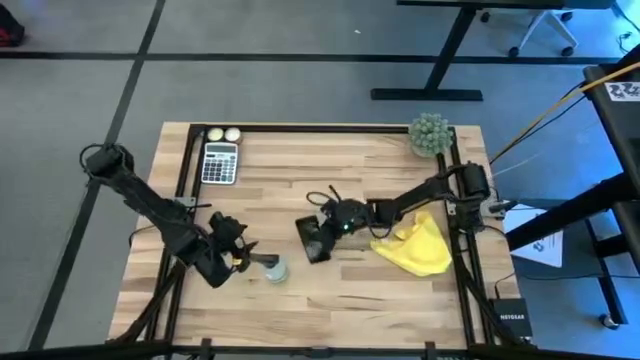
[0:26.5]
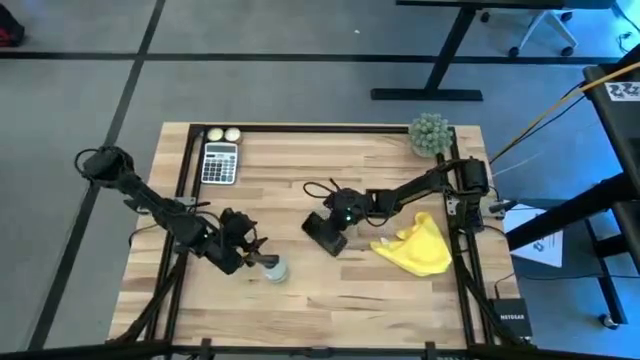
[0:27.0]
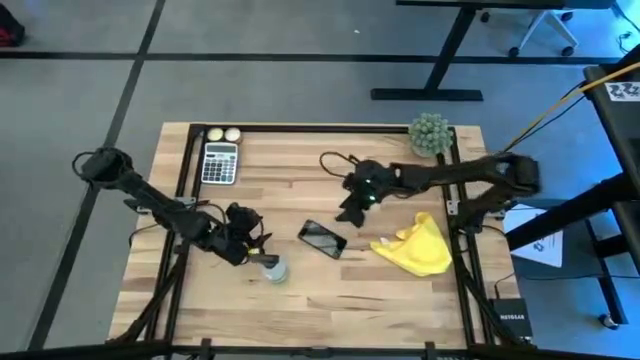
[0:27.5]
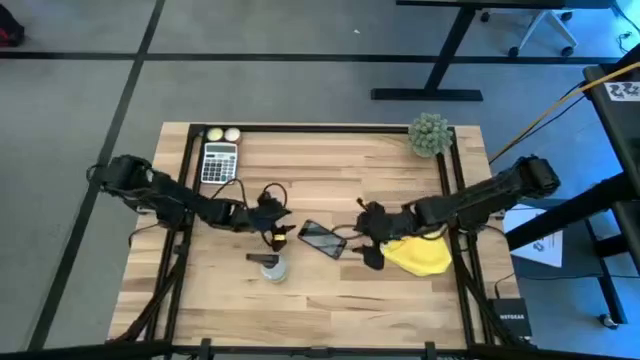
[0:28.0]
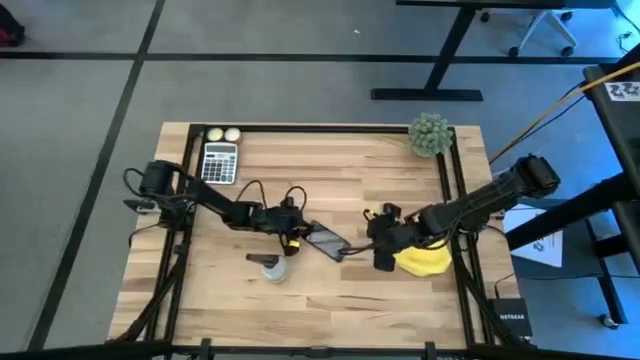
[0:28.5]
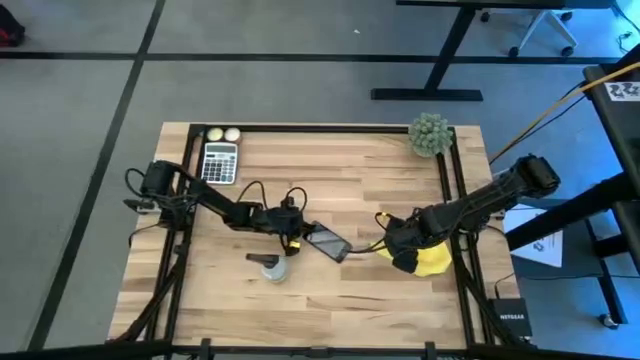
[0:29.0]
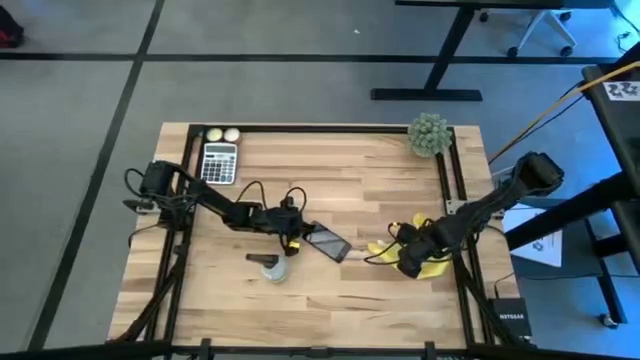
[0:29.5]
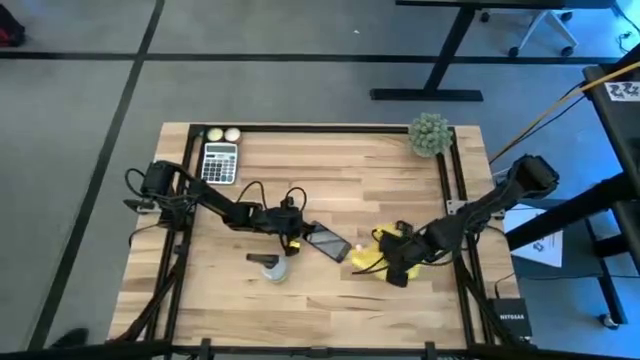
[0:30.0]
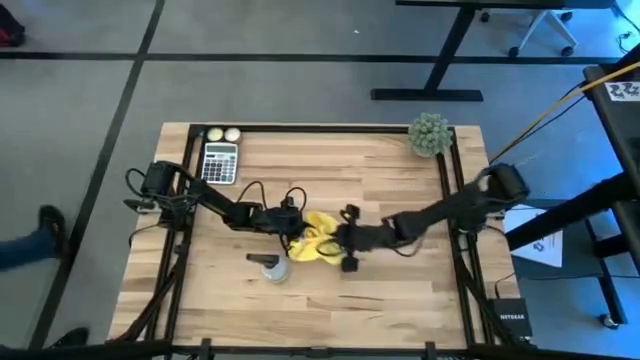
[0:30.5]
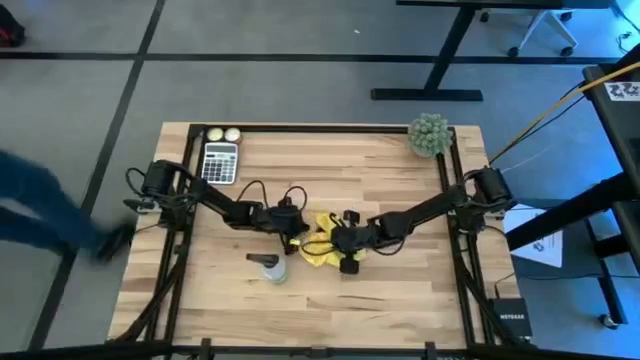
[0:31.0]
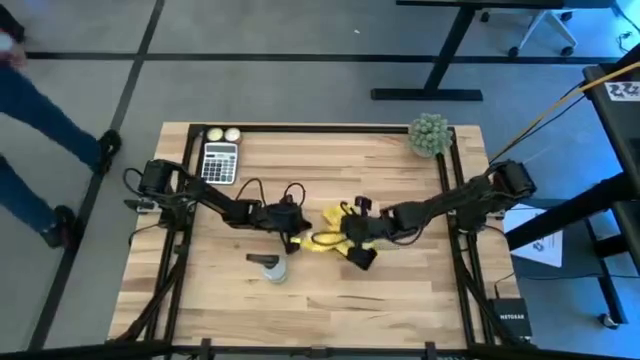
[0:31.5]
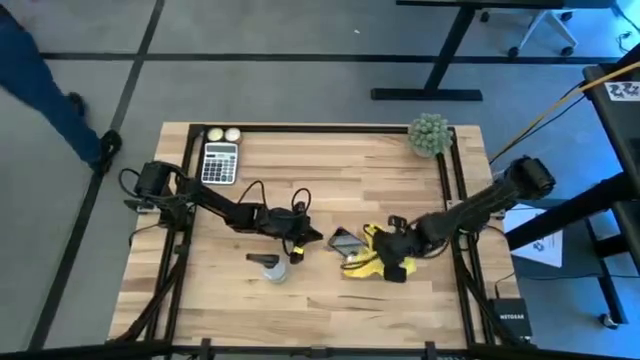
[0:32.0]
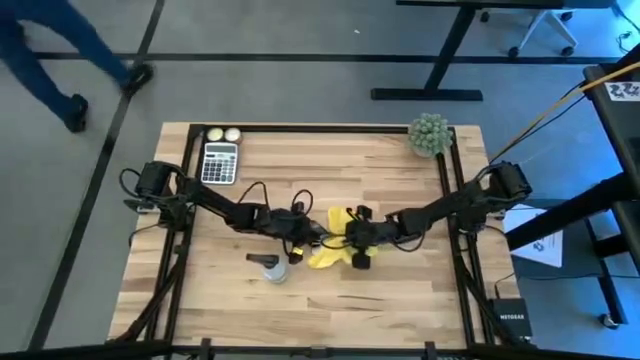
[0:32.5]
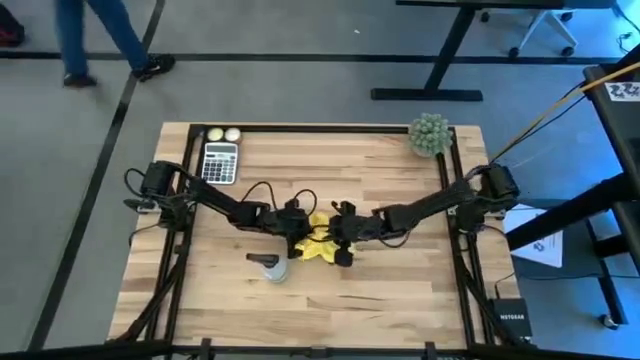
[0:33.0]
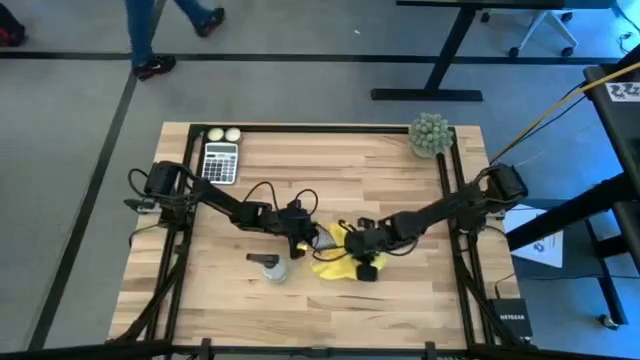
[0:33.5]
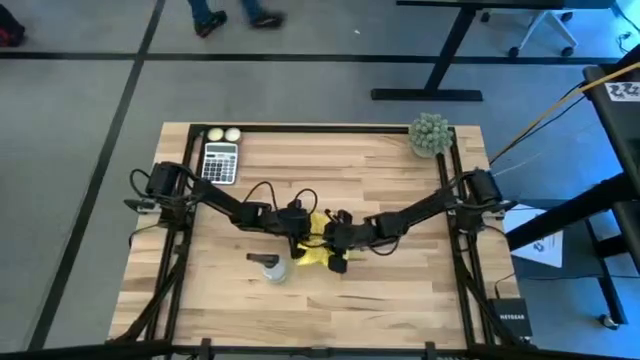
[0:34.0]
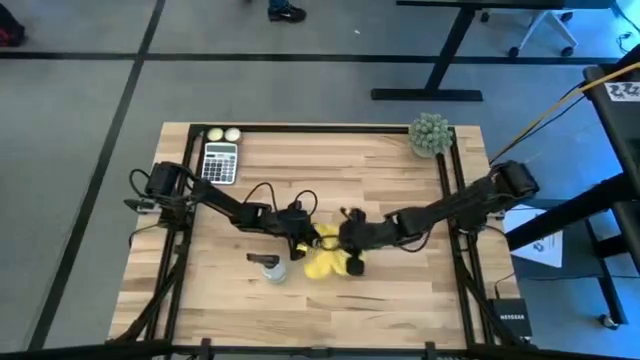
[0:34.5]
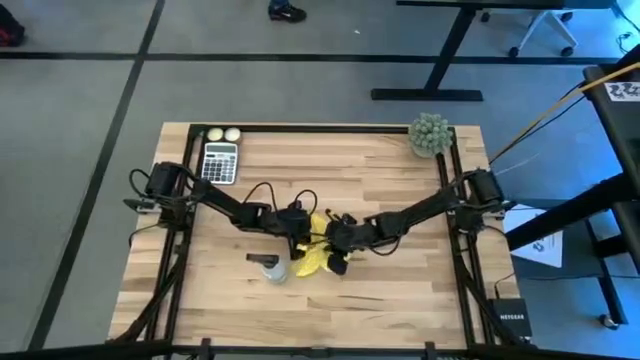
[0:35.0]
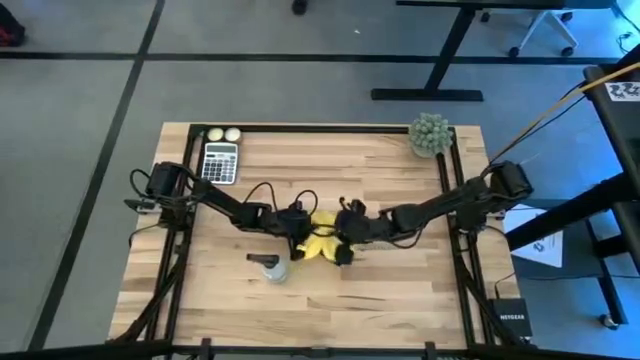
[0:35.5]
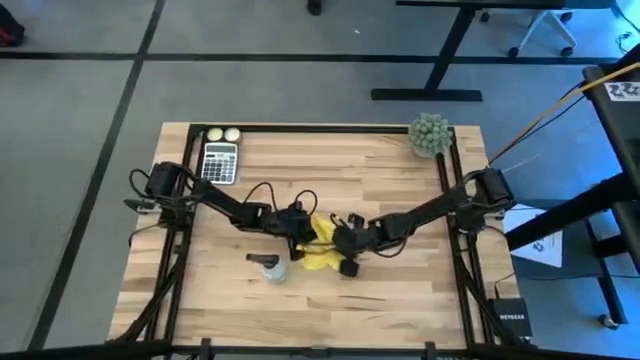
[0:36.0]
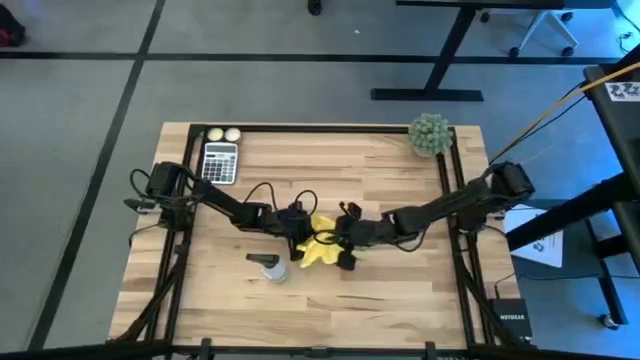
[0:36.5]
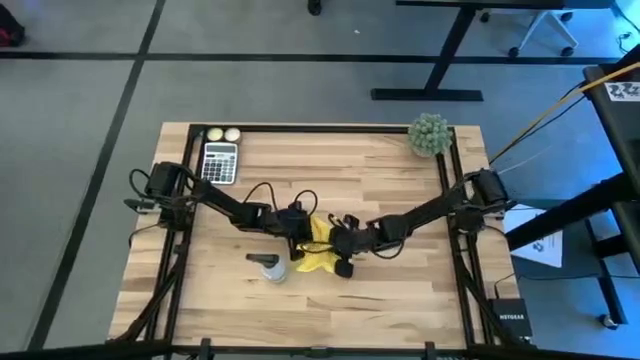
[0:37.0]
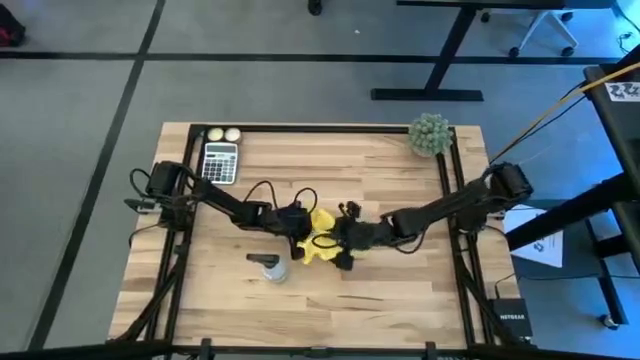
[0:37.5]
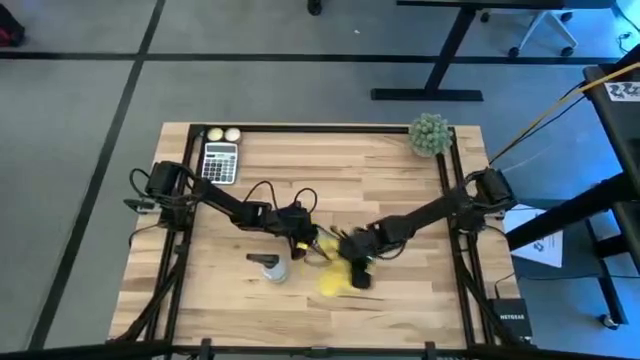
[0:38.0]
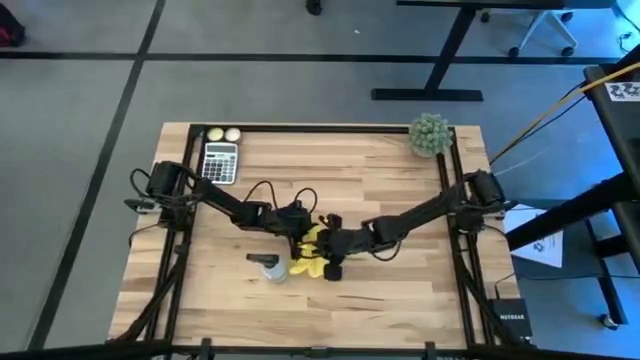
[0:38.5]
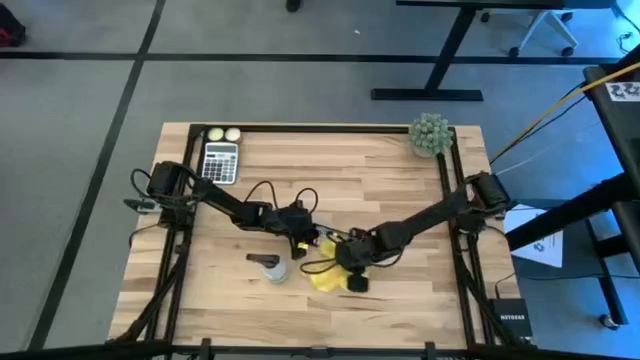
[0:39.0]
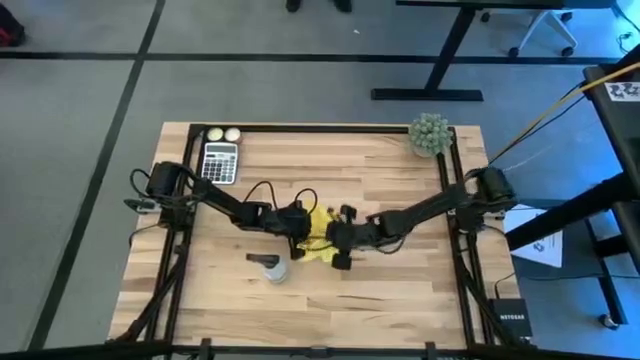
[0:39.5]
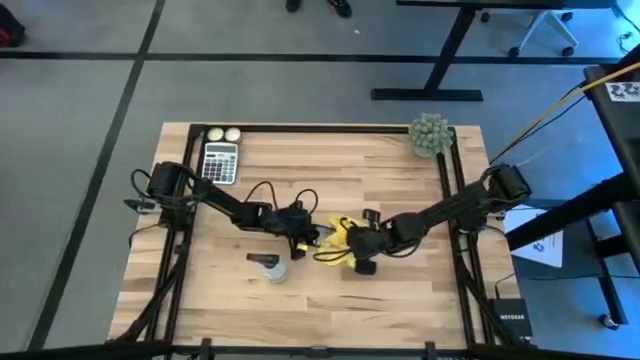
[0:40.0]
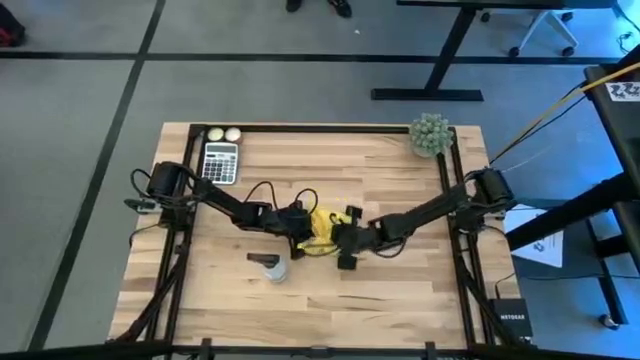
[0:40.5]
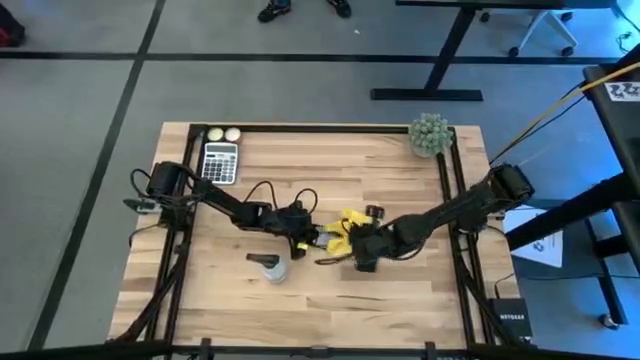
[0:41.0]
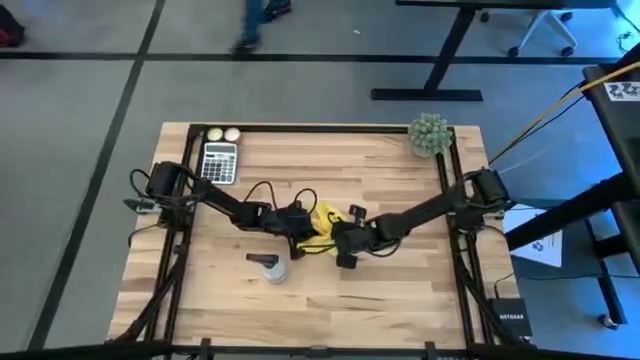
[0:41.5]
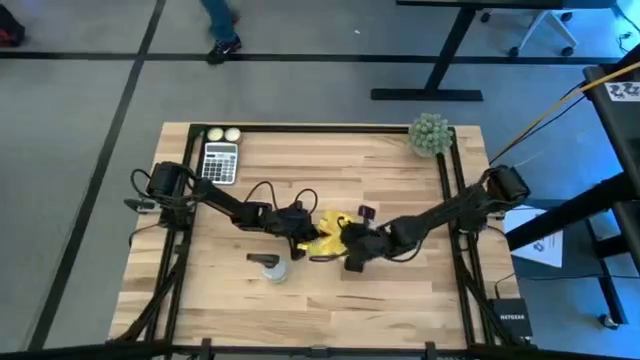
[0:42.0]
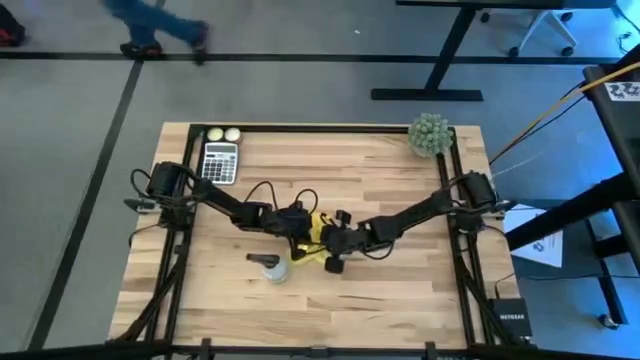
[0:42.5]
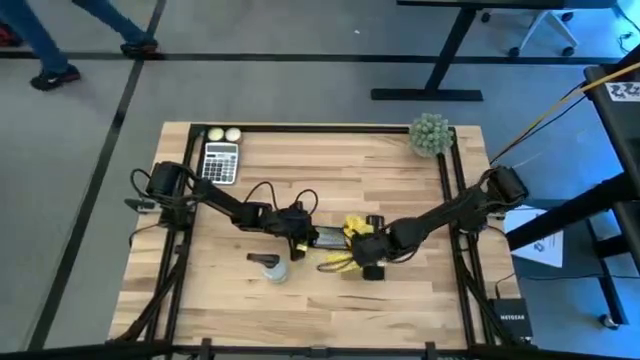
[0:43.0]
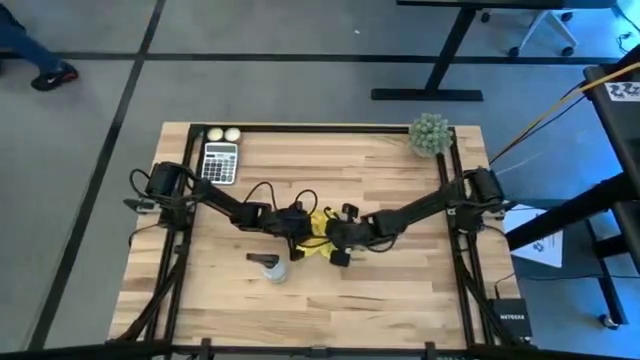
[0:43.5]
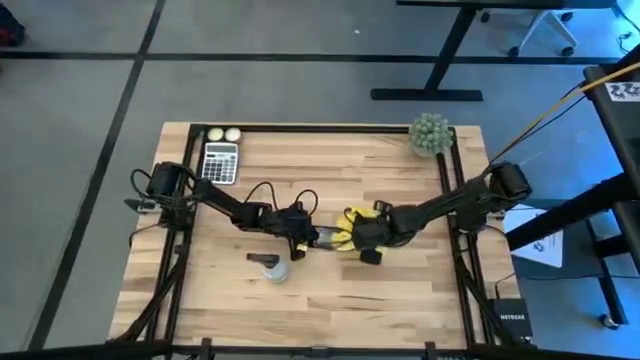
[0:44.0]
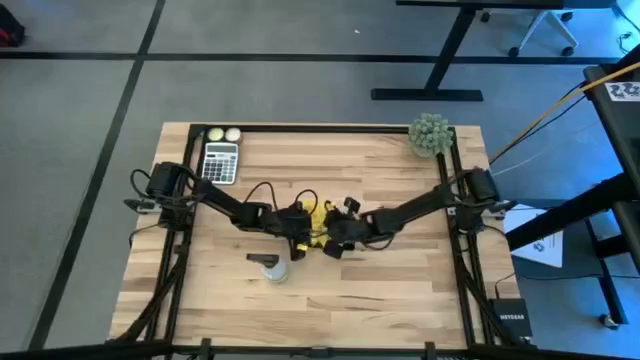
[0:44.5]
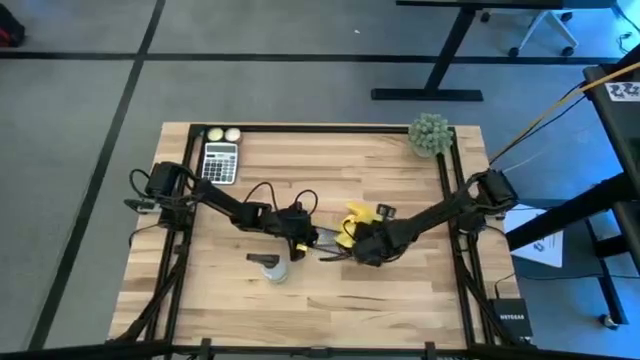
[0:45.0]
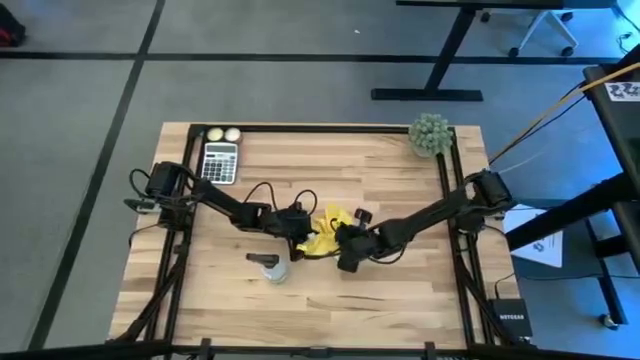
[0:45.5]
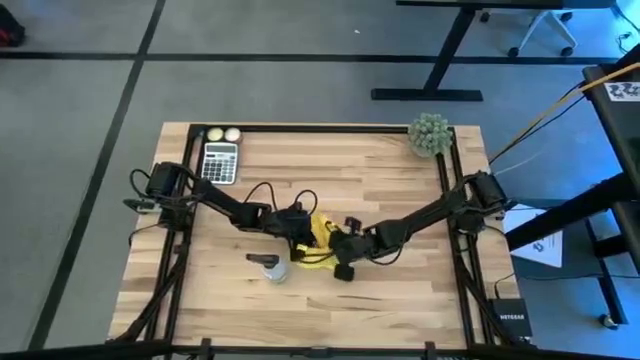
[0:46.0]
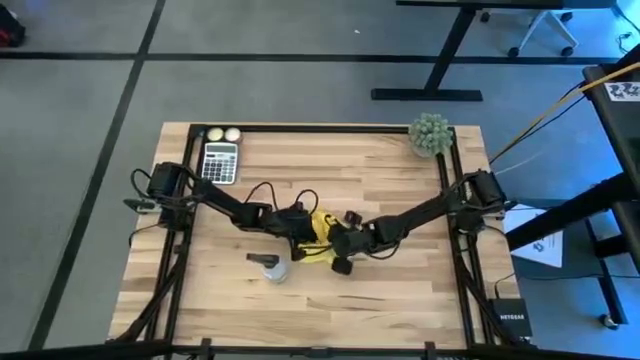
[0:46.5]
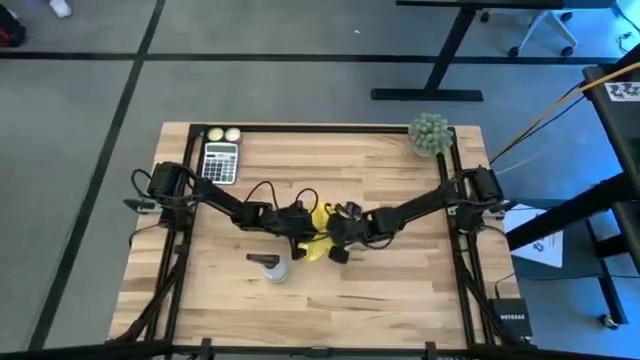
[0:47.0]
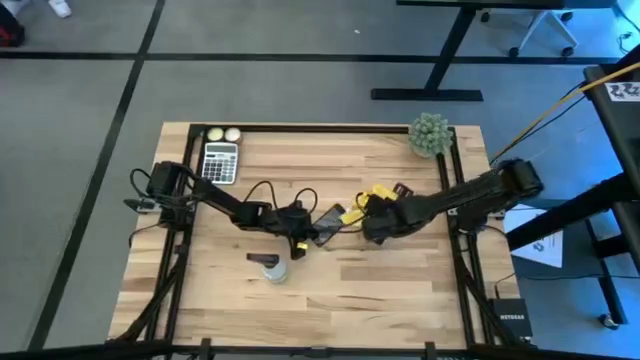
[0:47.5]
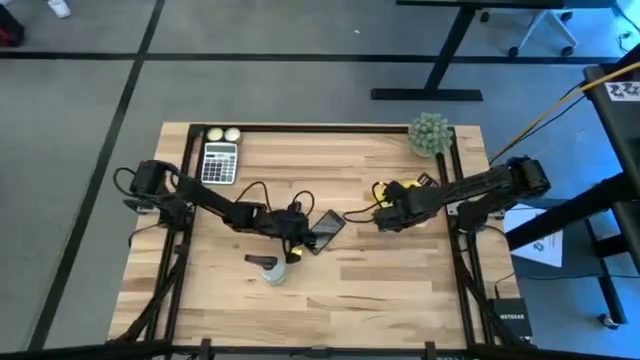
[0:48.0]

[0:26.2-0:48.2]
Task: Apply microfiber cloth
Wipe the front of the cellphone with a microfiber cloth
